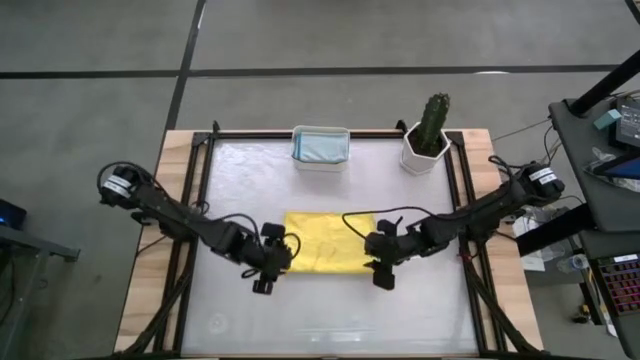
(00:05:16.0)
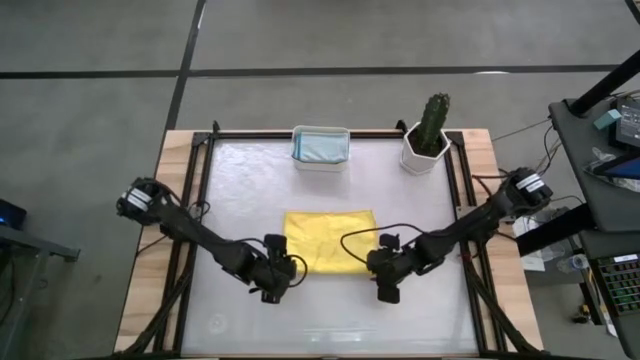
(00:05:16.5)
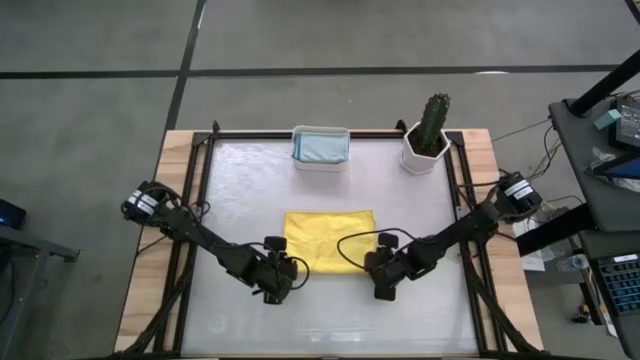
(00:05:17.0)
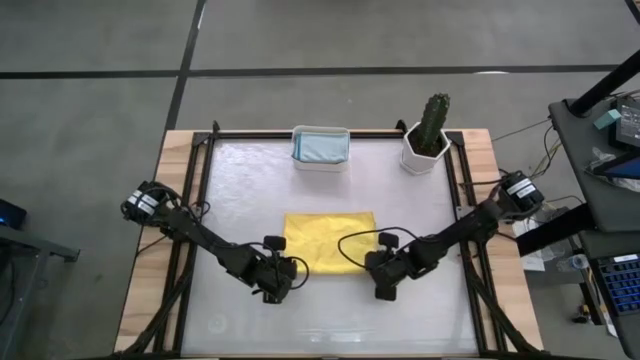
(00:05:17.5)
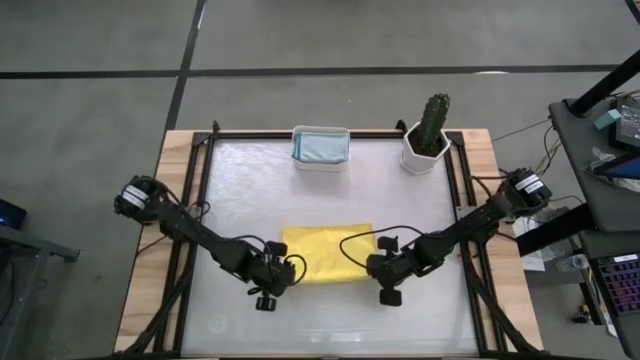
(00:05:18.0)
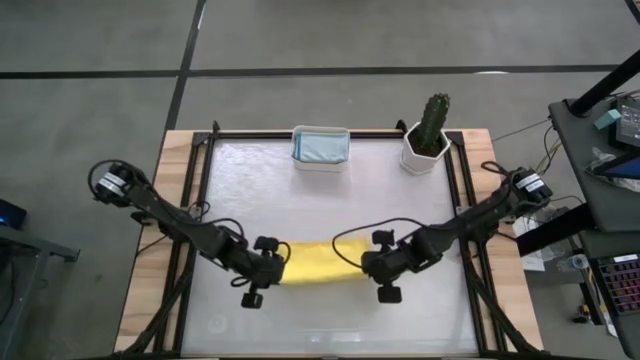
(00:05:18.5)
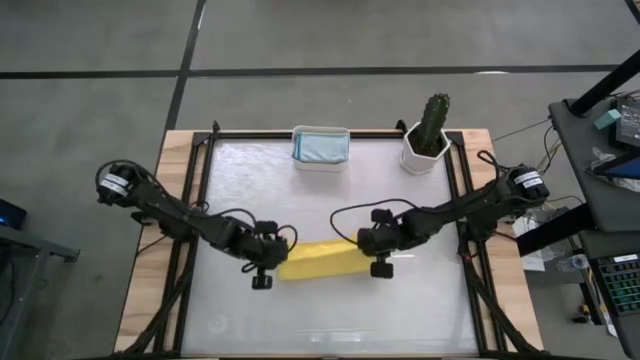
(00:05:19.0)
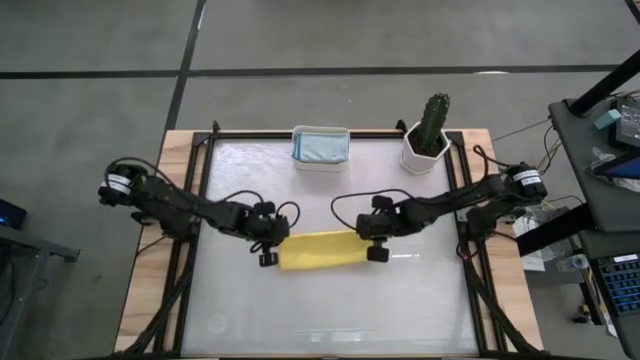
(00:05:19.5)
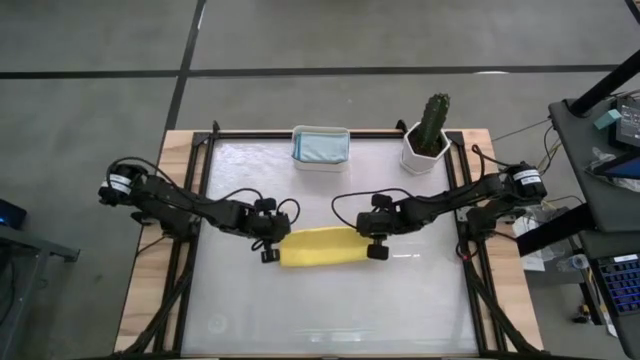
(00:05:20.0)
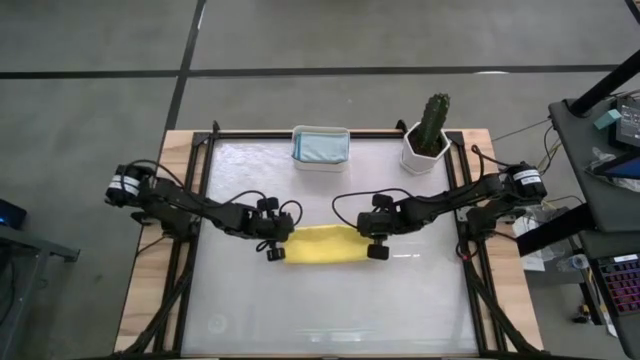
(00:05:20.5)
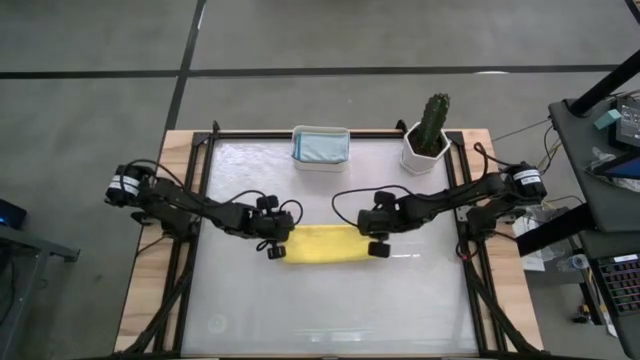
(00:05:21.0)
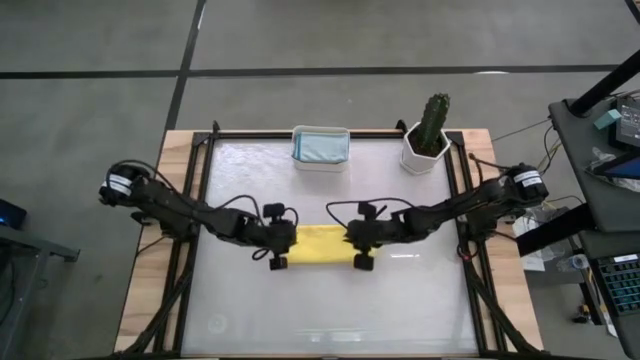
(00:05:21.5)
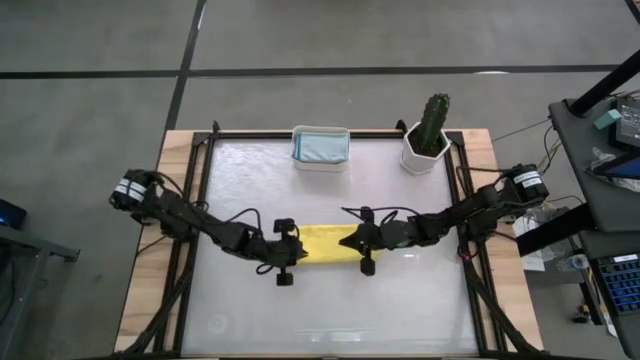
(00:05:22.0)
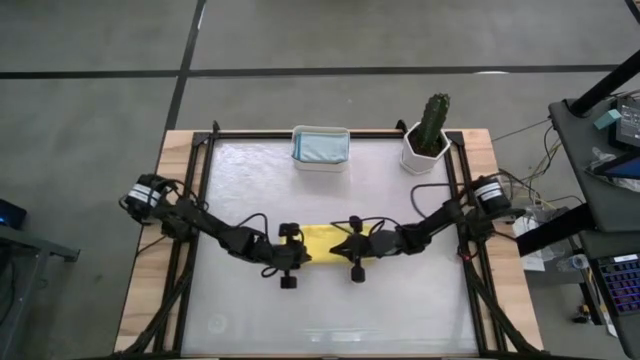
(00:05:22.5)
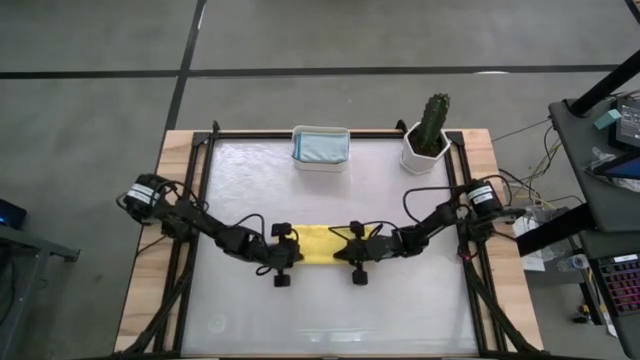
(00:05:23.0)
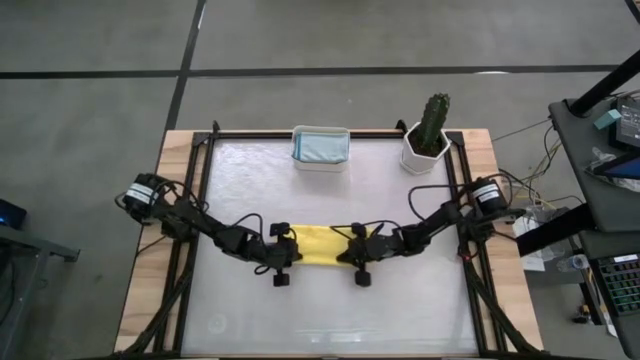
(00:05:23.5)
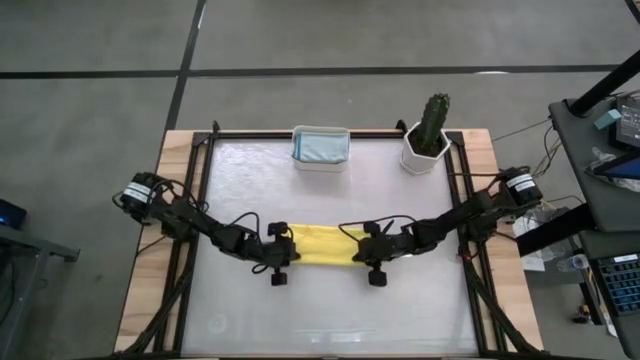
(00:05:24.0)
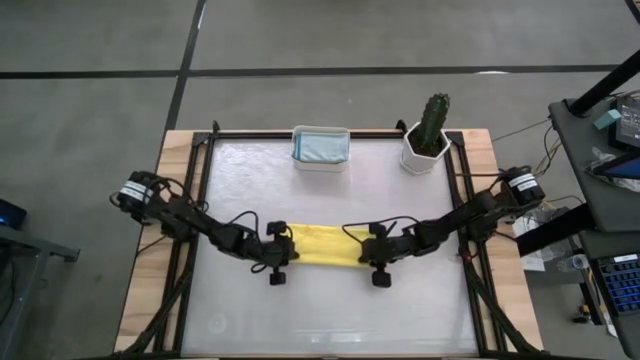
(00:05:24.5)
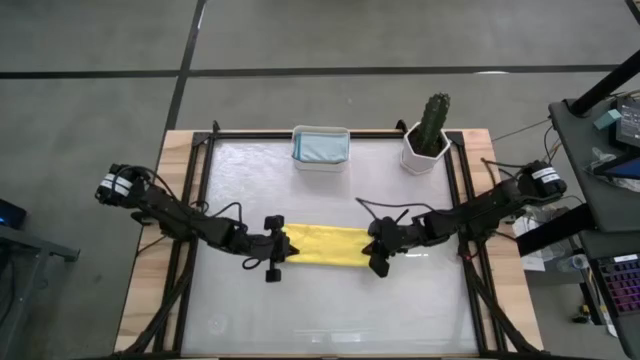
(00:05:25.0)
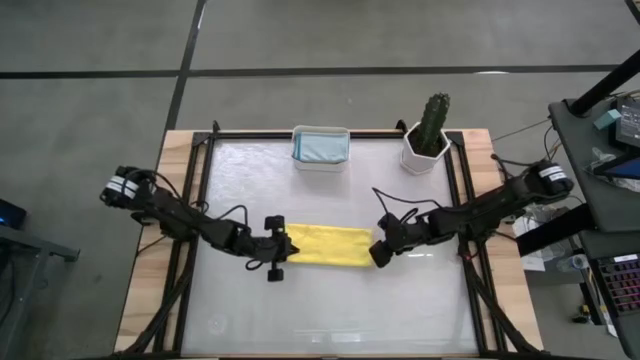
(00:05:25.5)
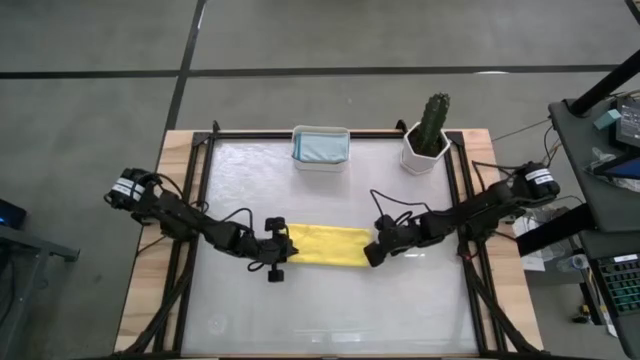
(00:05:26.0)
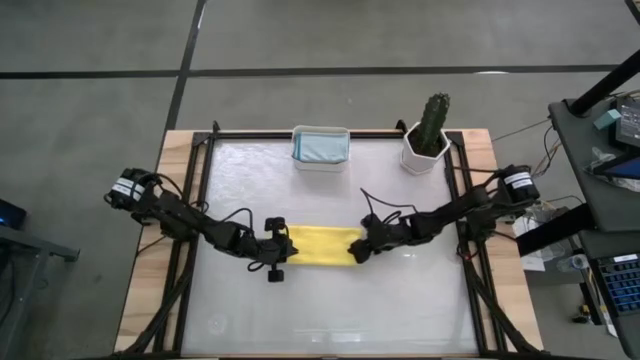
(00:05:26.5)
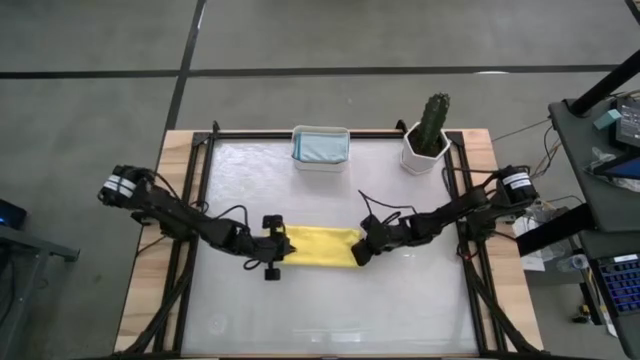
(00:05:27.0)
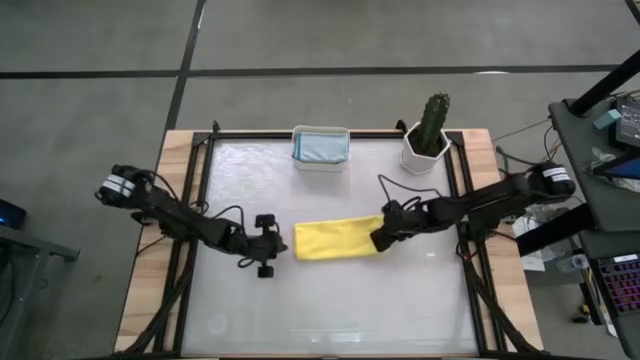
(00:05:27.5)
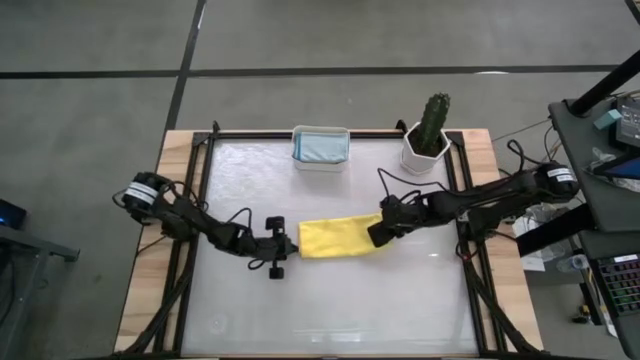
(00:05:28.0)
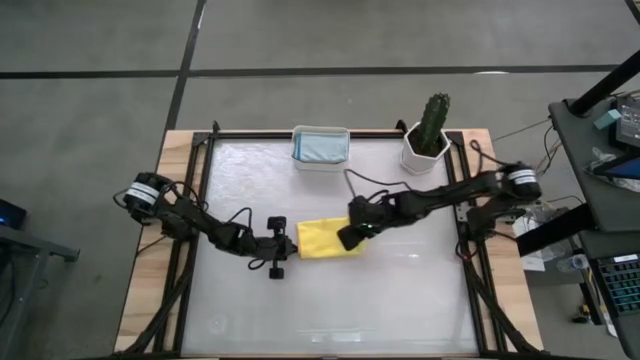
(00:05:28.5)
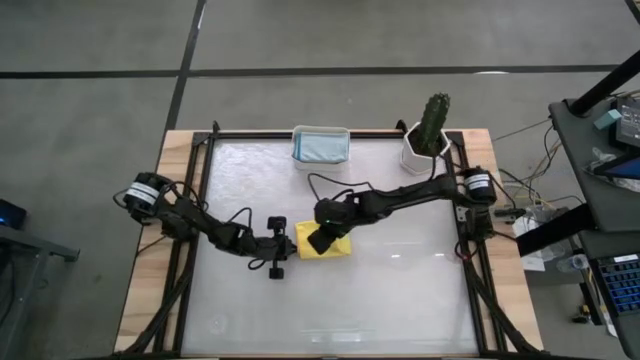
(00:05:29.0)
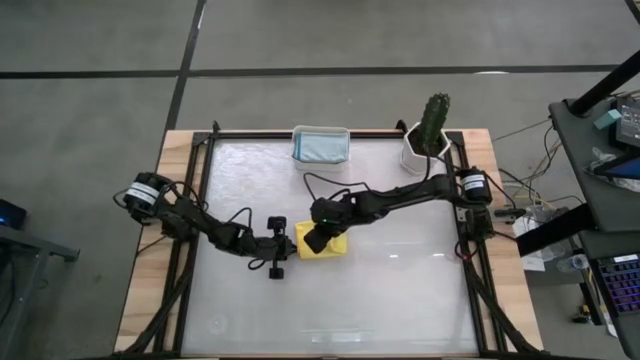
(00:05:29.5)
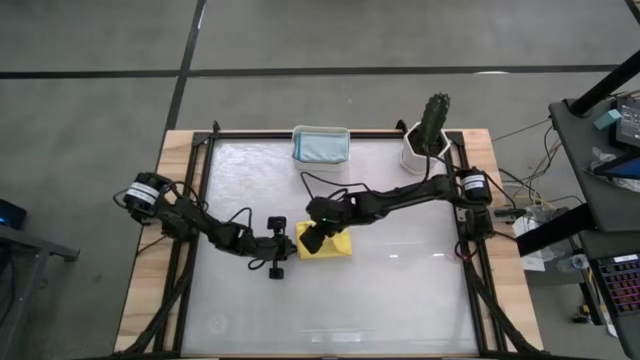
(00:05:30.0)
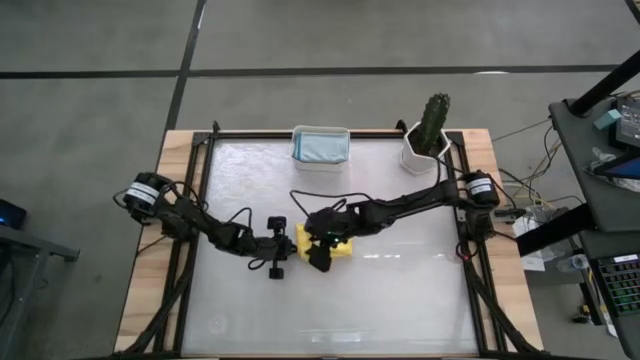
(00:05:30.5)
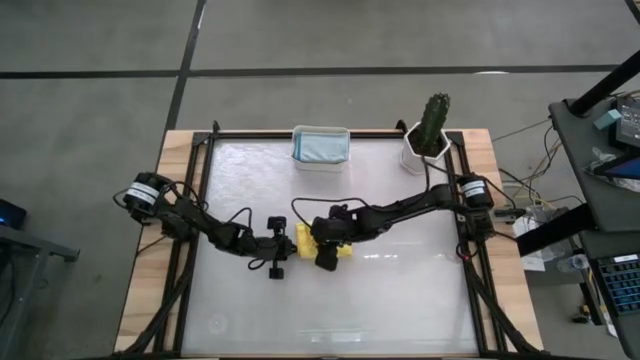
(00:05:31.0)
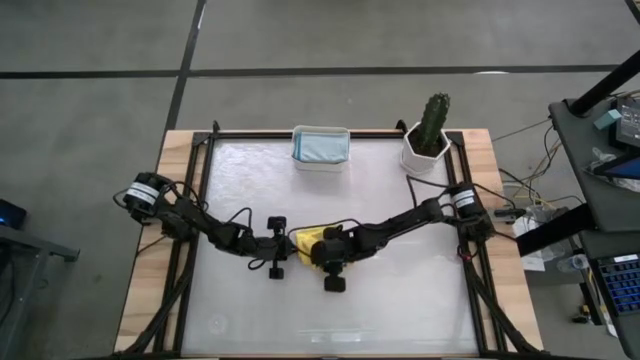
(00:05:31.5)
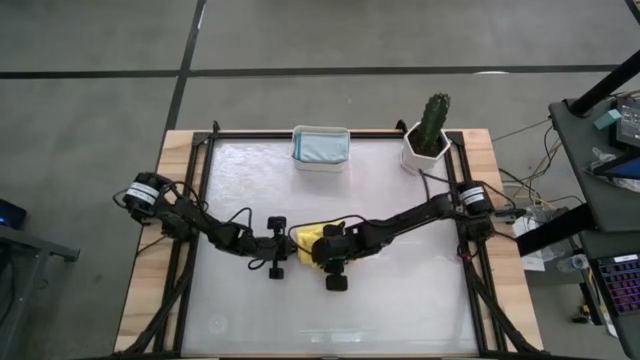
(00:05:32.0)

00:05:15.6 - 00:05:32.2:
Task: Fold microfiber towels
Fold the yellow cloth
